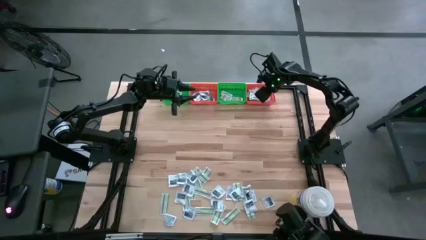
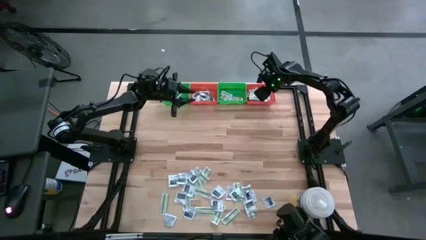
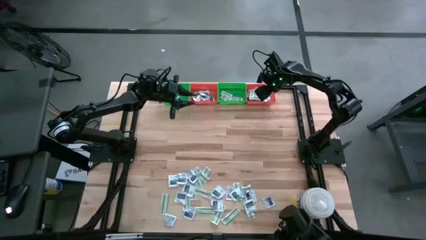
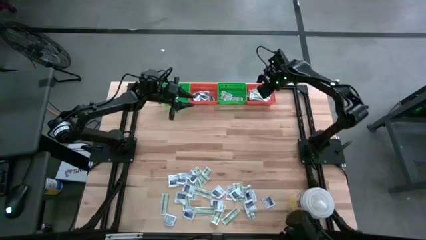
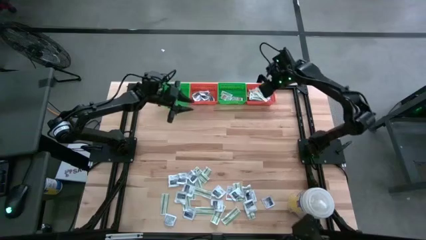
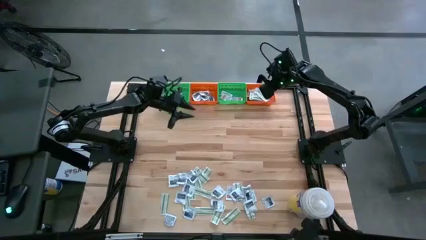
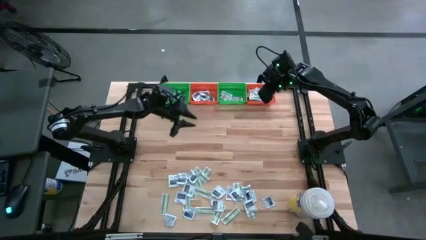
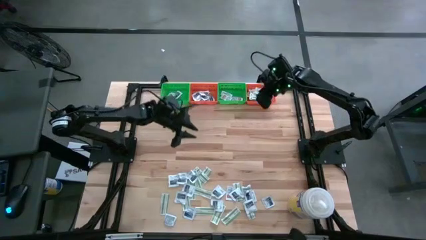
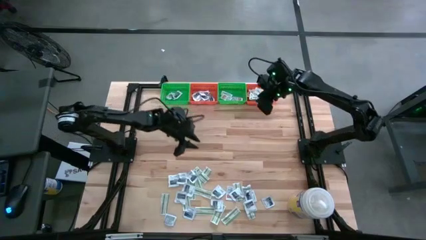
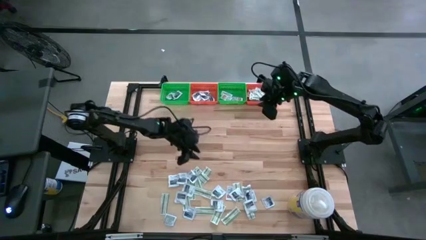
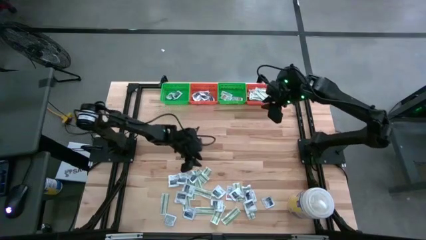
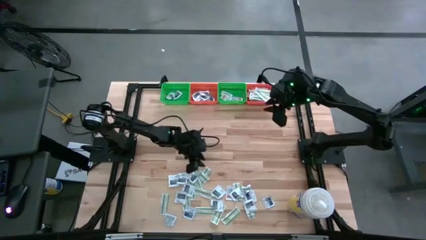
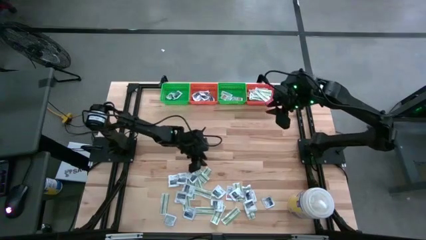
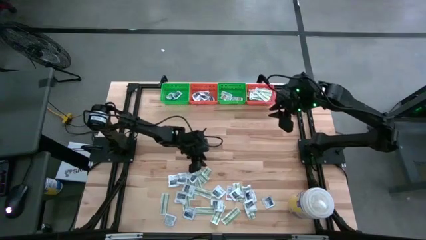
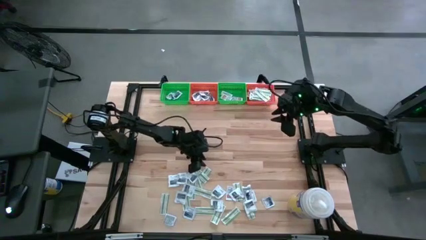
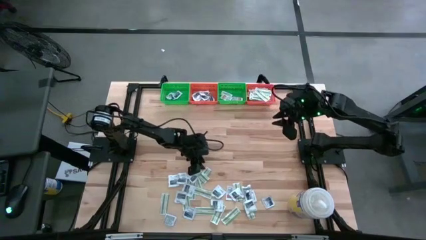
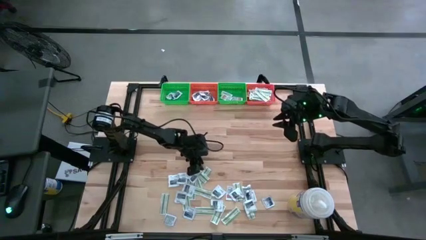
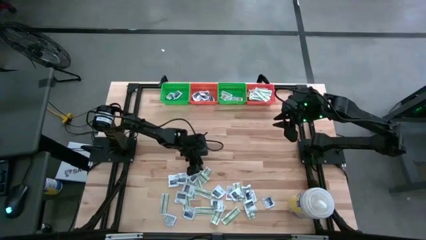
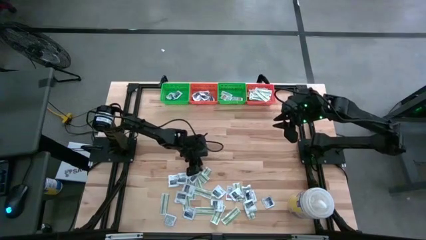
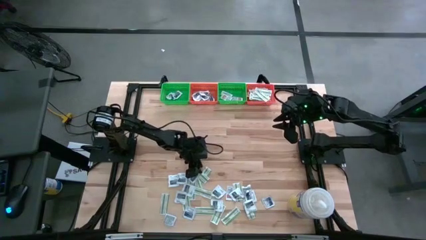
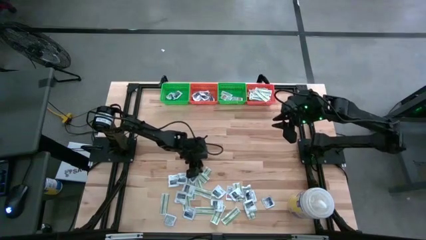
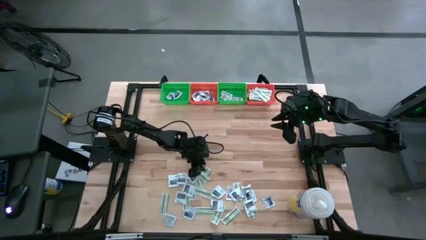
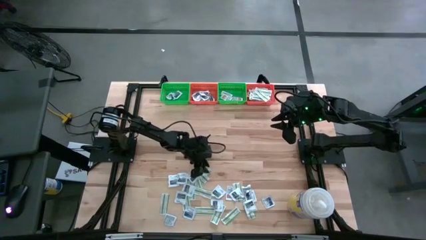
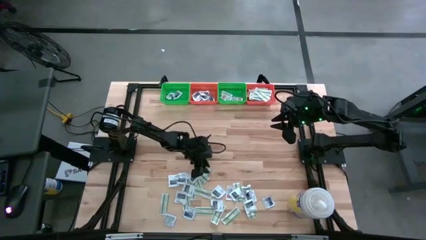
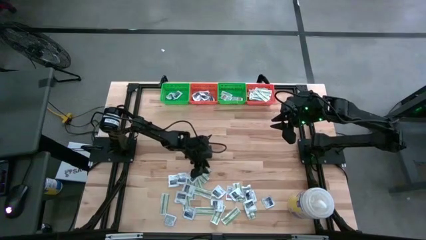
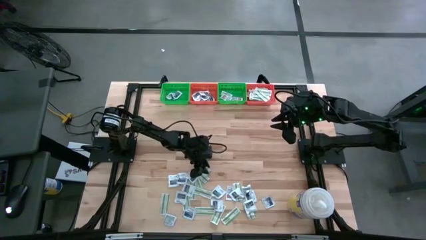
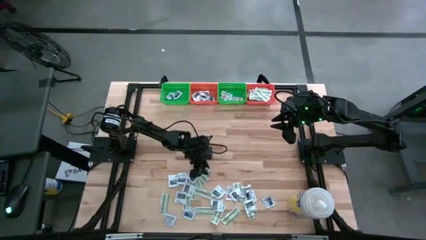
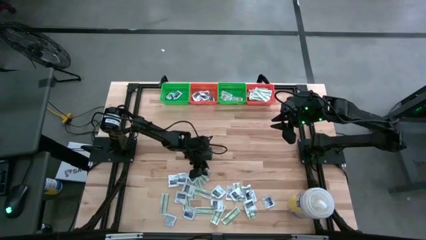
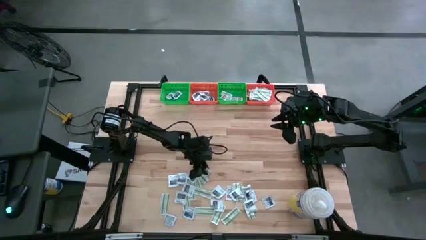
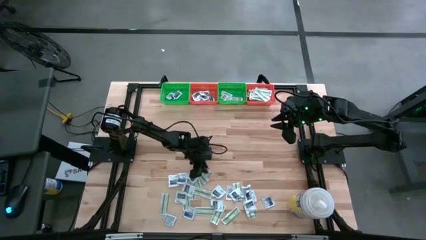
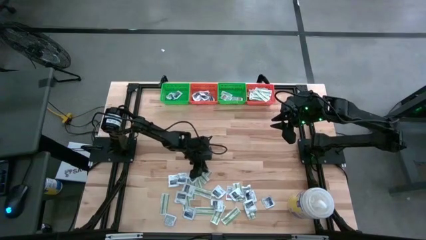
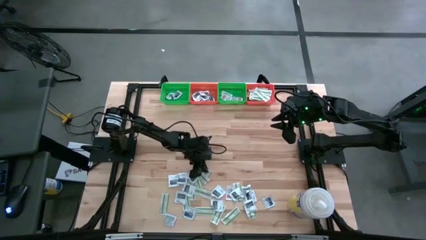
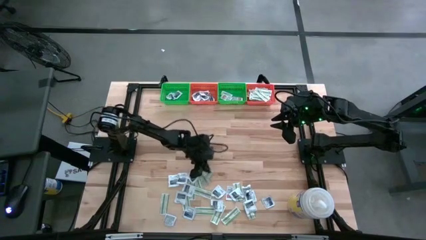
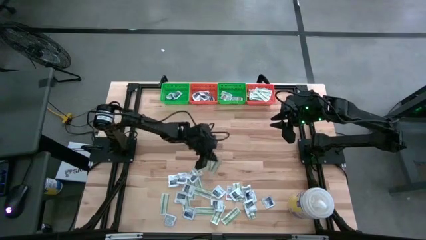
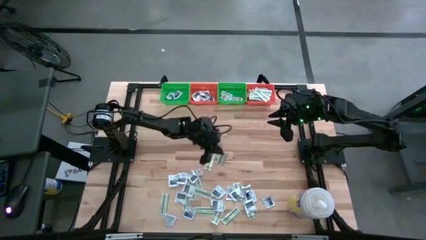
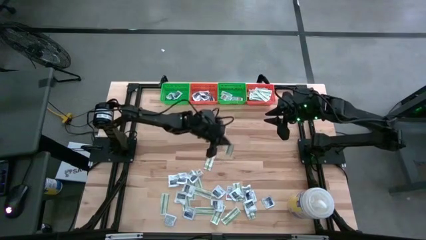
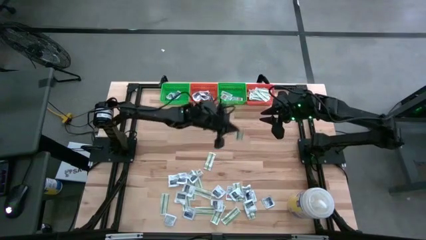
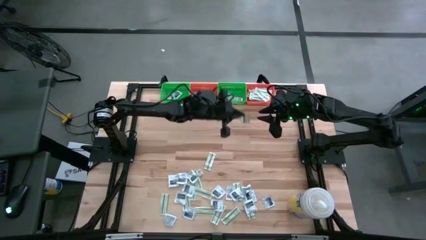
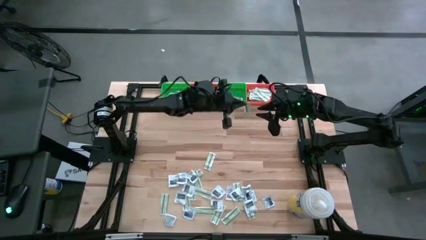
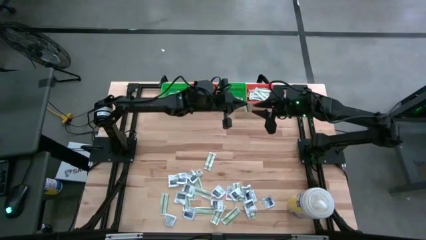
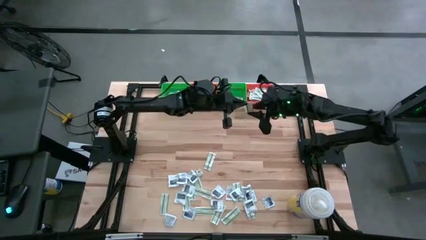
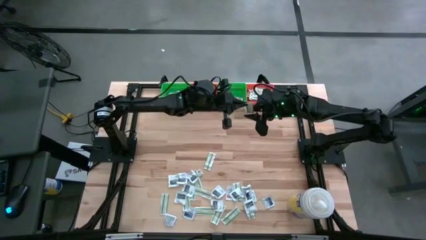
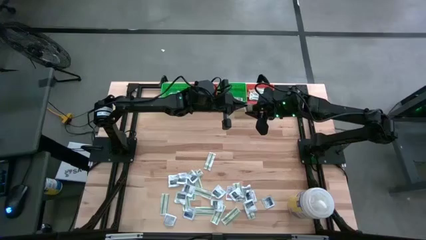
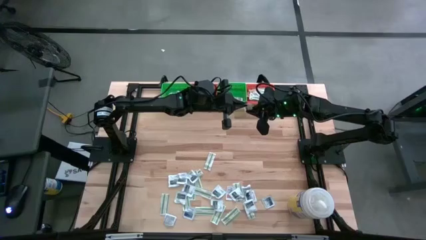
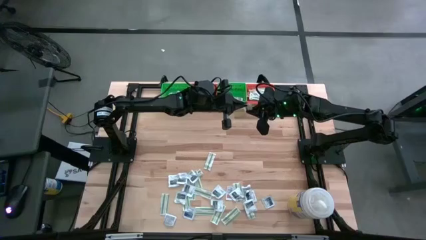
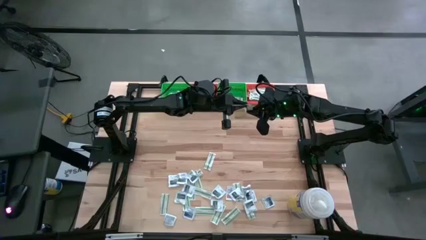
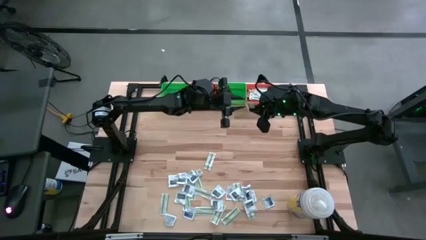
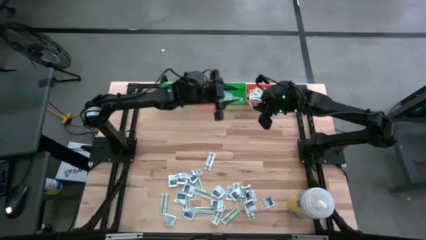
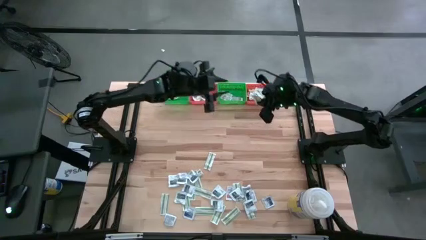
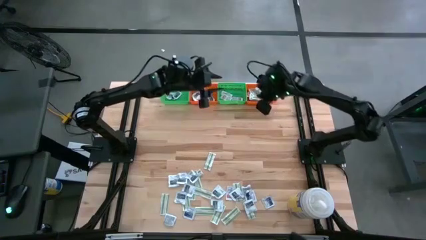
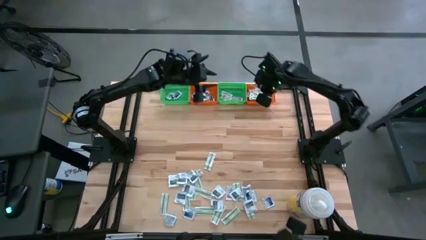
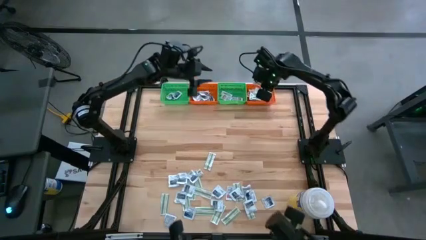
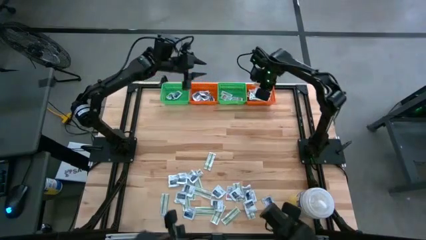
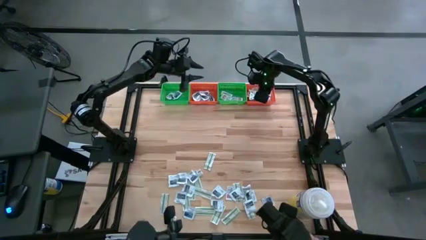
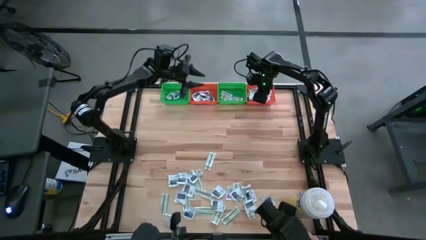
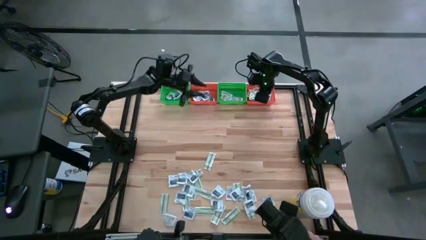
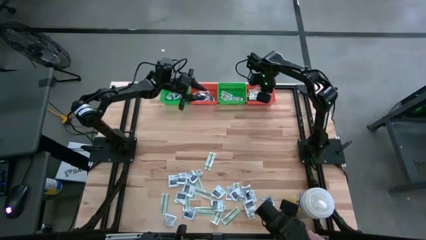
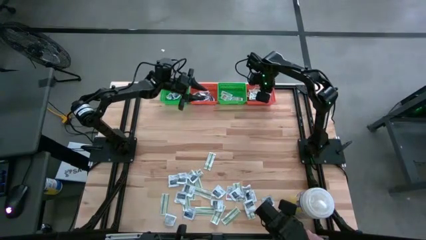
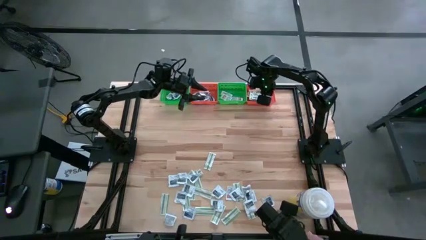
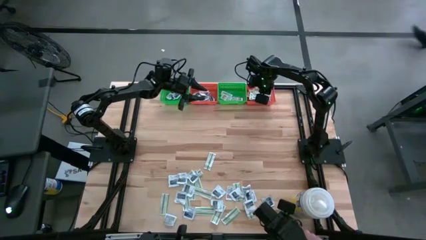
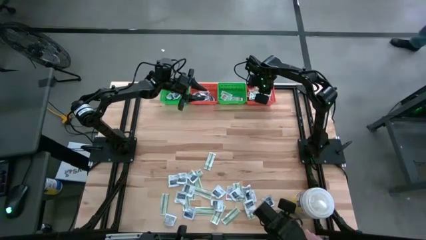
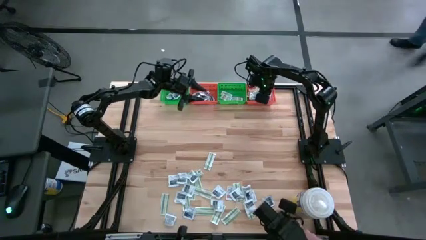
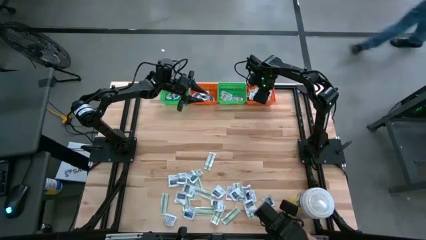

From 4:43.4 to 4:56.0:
Task: Pick & Place First Aid Supplies
Put the green bandage pack in the right orange bin

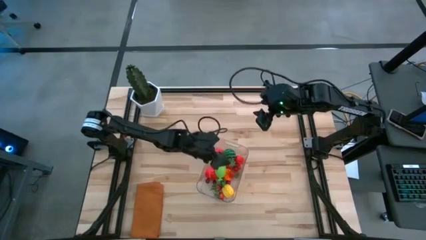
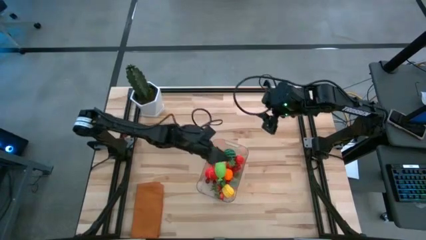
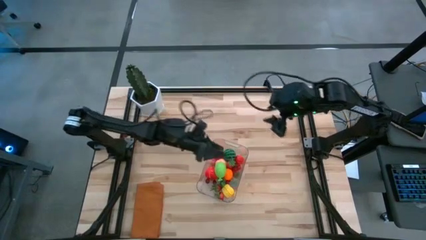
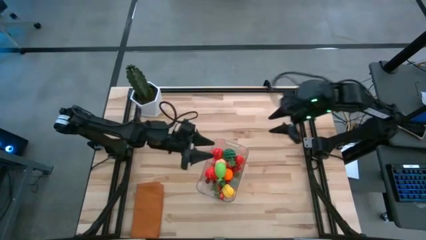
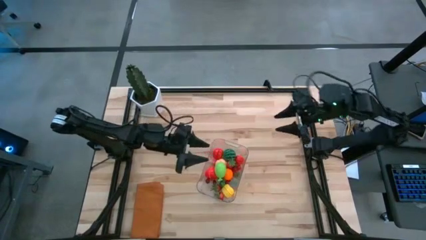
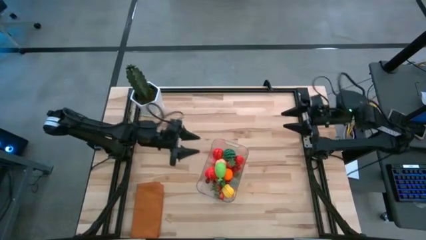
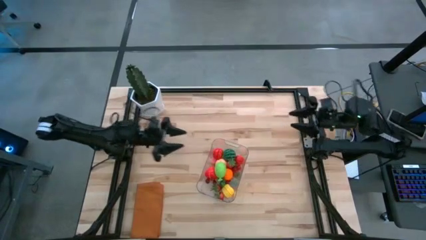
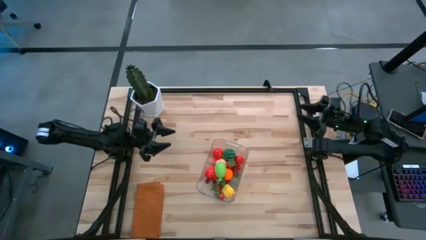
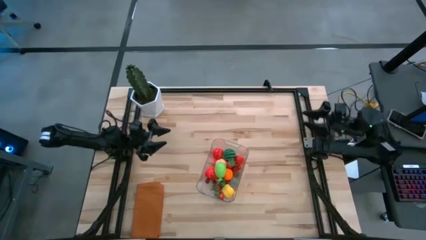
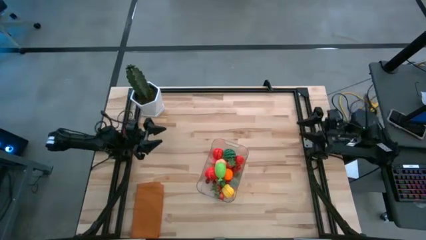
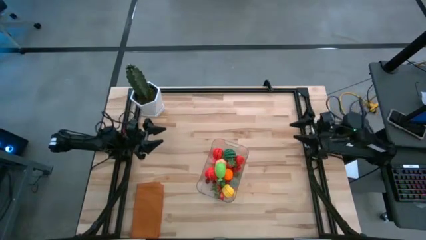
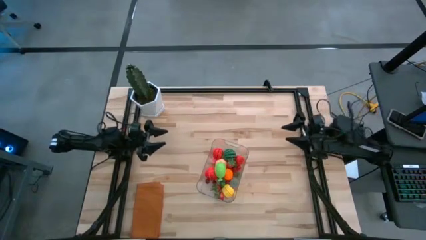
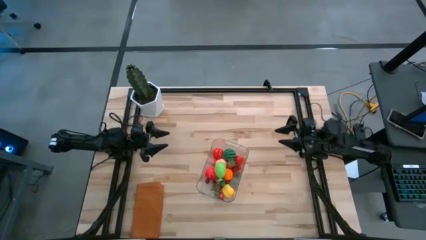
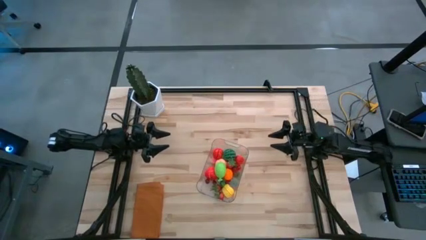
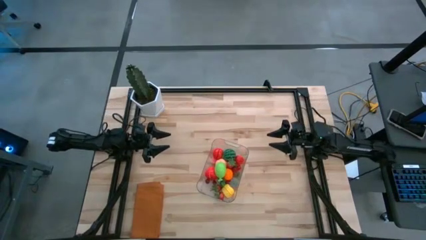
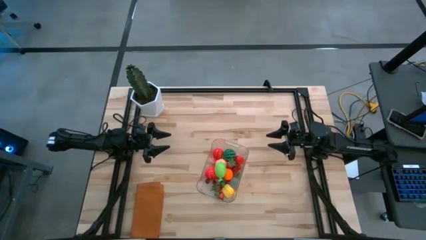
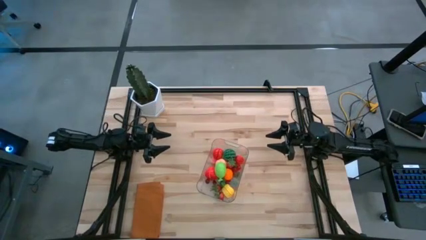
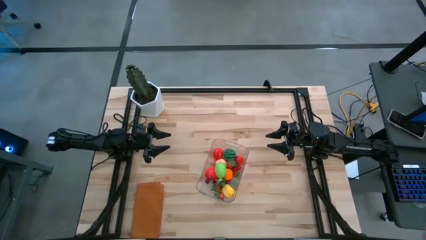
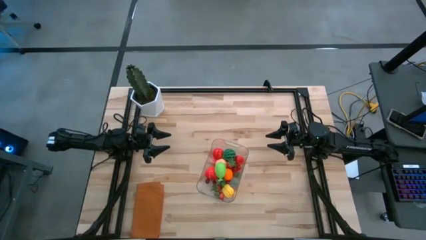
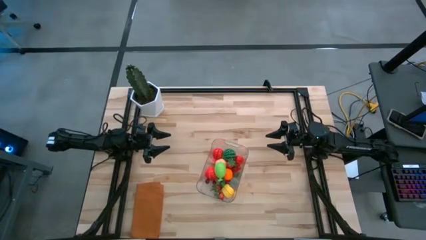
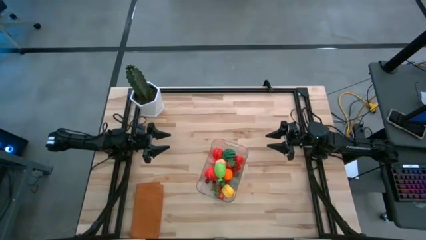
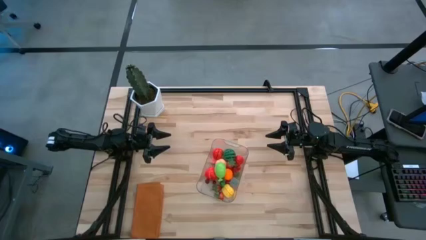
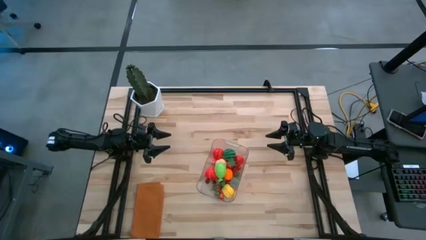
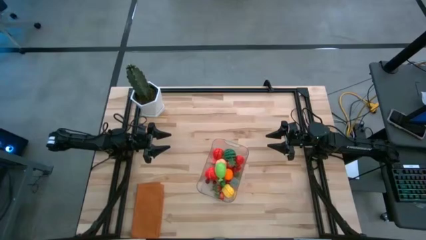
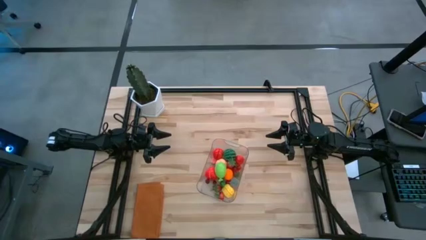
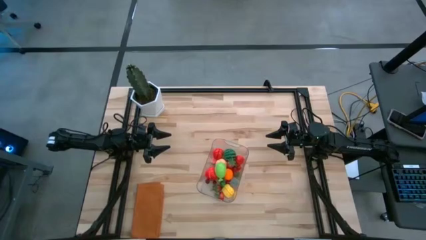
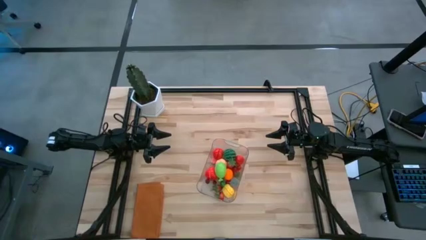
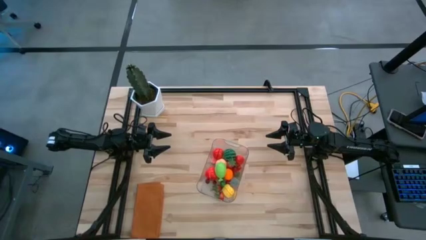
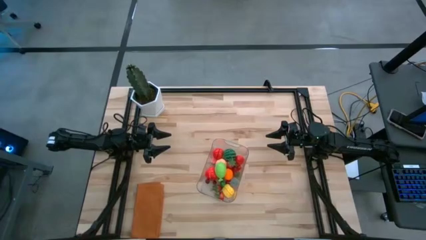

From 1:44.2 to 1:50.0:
Task: Pick and placing Produce into tupperware
Return to Home Position
